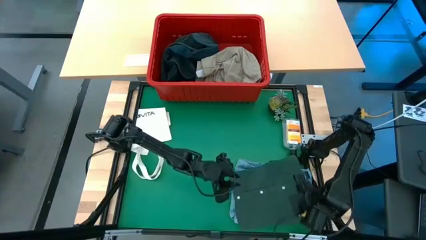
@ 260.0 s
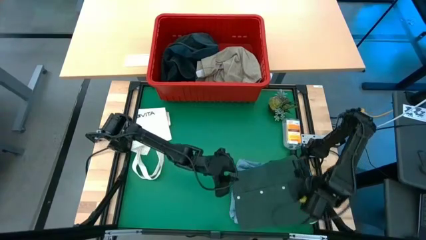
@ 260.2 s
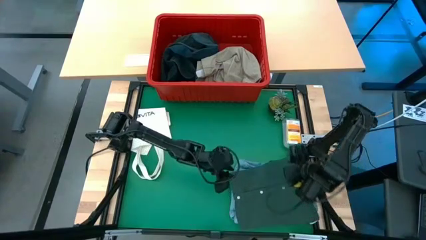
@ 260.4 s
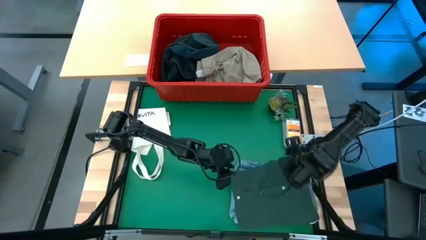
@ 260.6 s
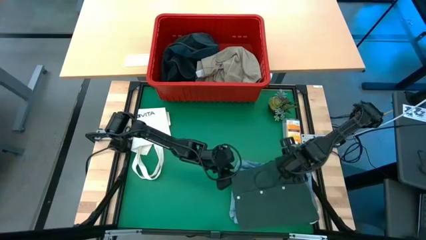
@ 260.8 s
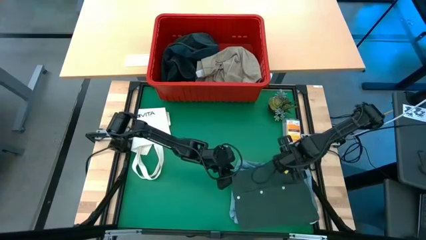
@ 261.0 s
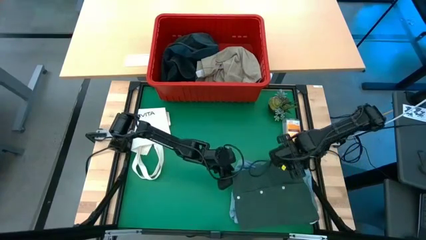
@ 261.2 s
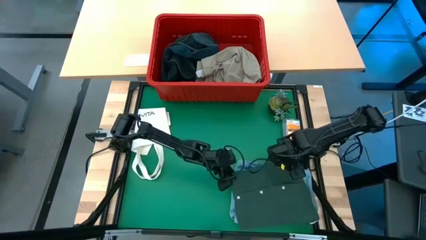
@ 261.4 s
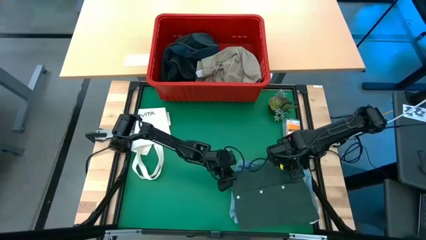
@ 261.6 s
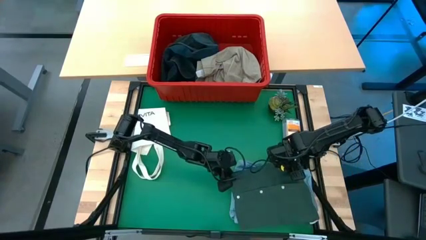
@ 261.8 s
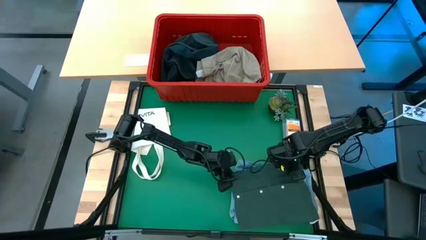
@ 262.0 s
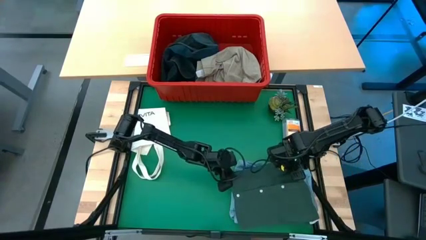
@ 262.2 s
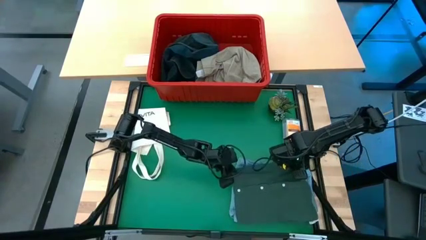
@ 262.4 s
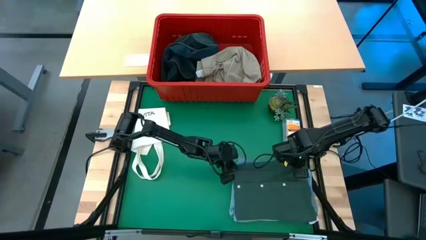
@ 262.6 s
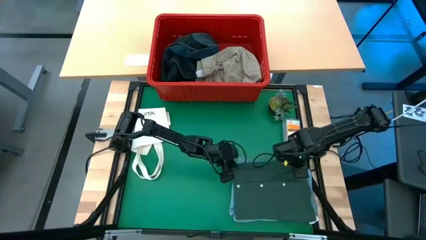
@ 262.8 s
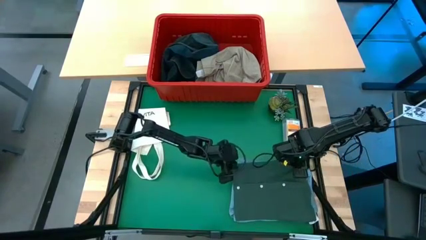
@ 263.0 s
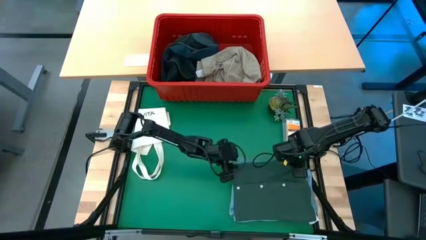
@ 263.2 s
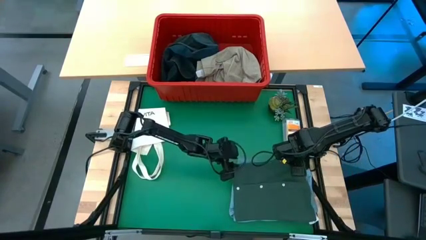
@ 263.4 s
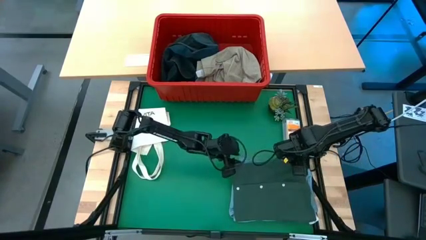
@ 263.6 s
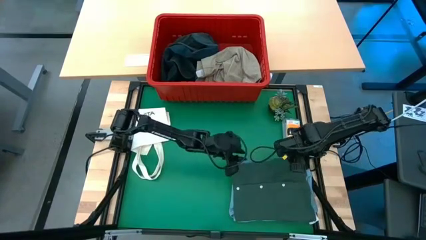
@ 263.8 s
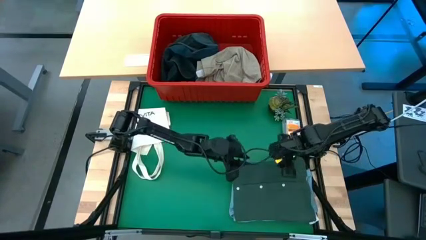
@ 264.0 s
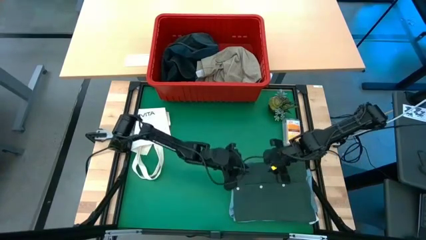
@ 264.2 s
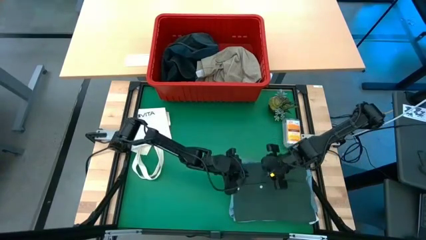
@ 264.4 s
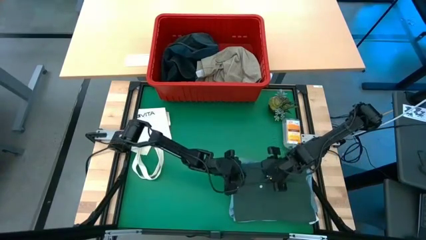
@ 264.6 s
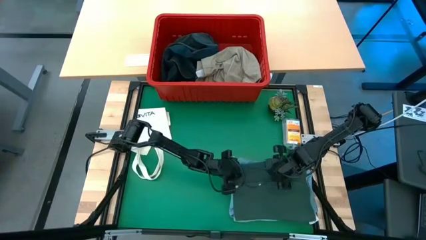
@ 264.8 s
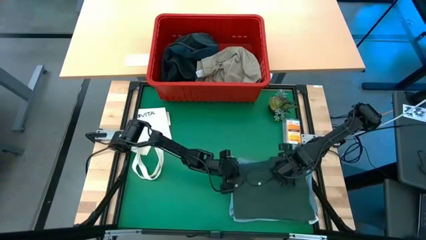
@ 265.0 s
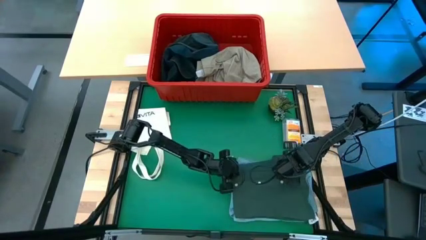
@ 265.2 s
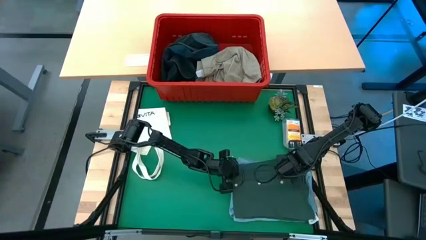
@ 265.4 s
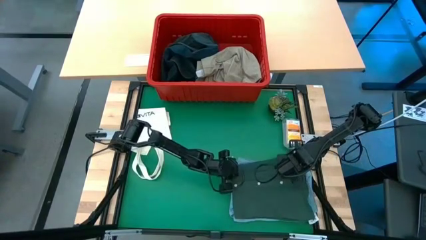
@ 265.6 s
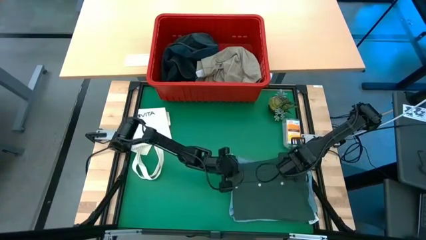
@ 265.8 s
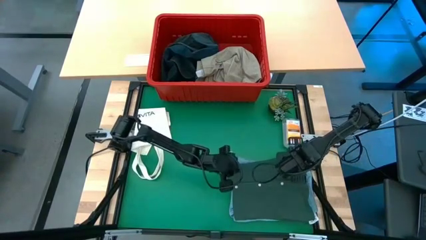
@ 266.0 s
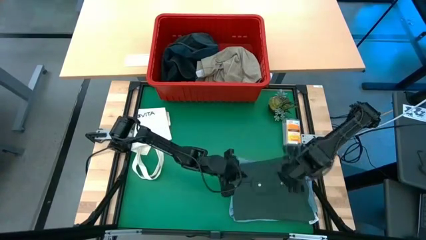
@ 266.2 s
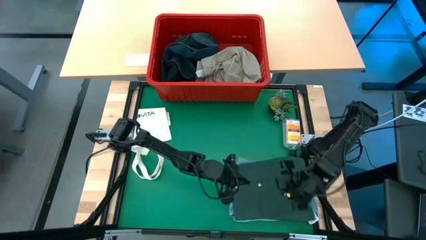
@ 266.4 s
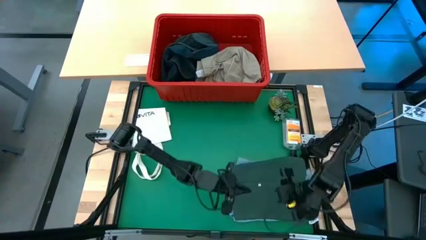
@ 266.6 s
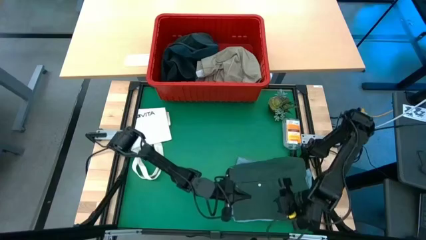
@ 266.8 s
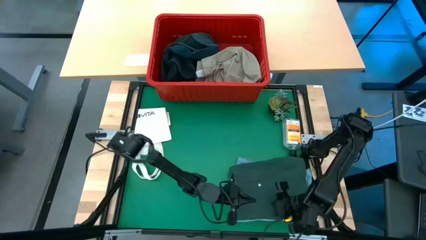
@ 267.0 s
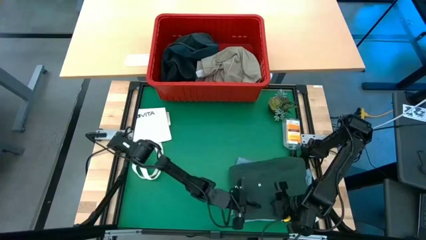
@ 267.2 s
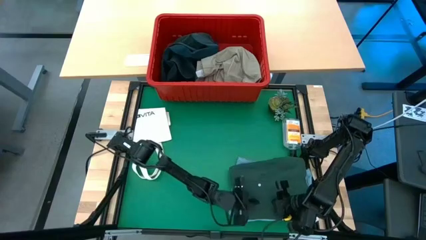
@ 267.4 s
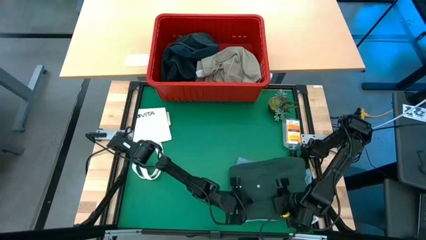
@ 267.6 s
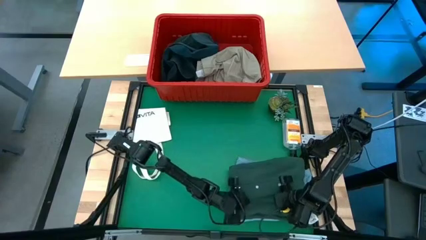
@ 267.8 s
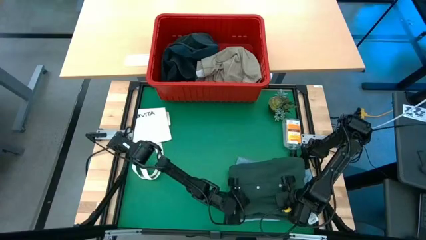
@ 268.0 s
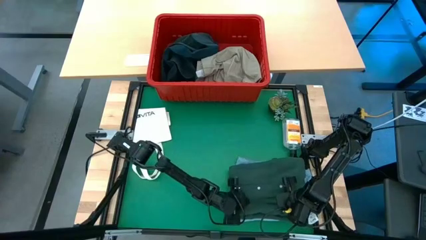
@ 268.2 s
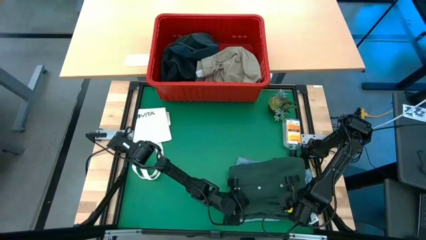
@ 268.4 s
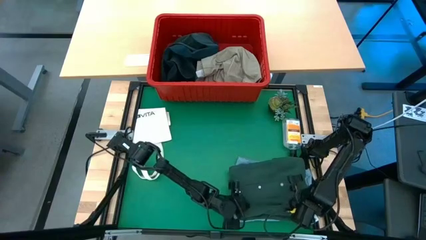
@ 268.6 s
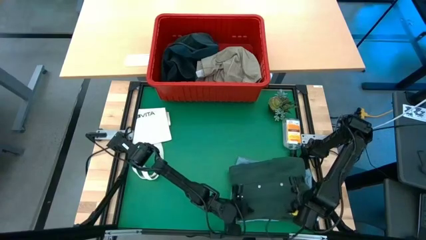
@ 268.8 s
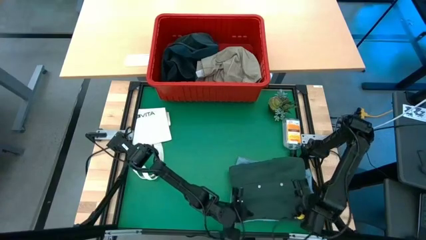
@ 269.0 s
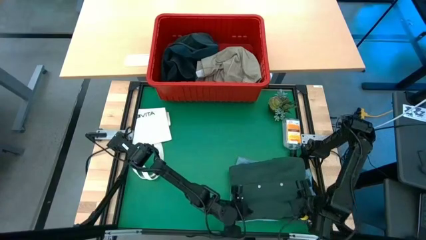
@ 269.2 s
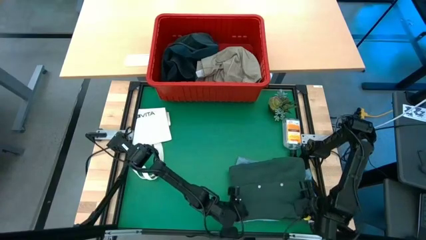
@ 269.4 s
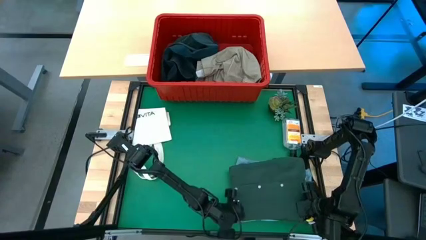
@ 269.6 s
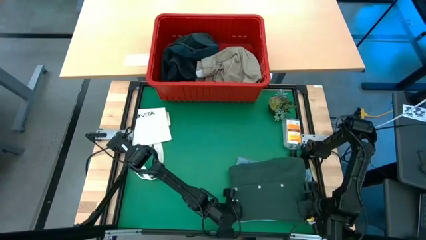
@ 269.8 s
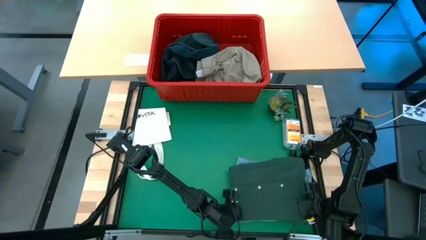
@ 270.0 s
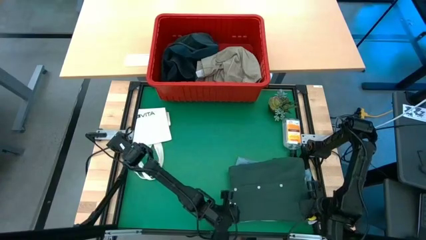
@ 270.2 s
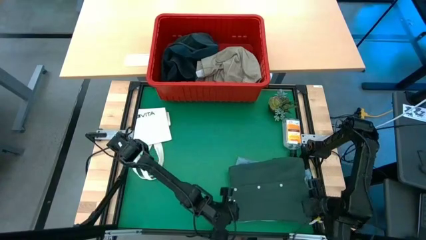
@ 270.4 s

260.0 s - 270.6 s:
Task: Fold Laundry from Bin
Stack the green shirt on top of the light blue jeans

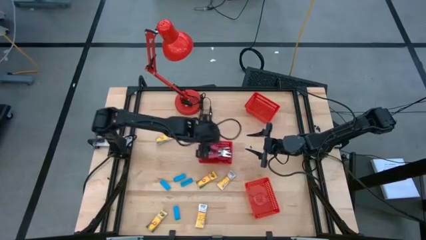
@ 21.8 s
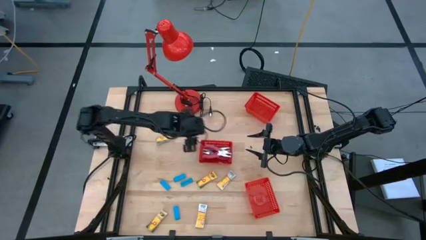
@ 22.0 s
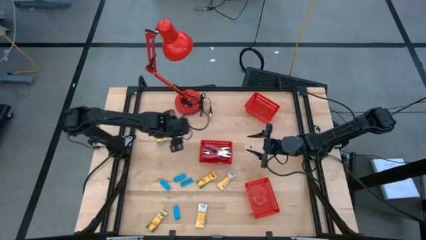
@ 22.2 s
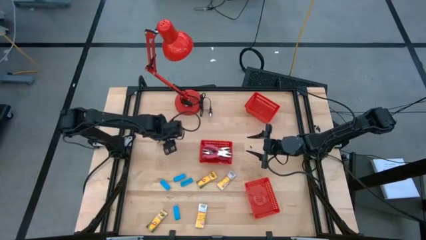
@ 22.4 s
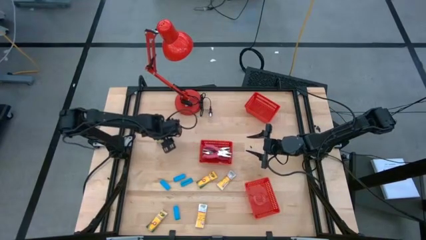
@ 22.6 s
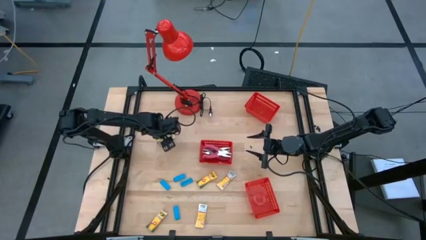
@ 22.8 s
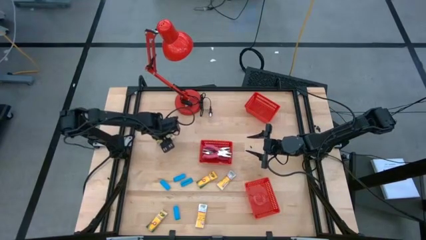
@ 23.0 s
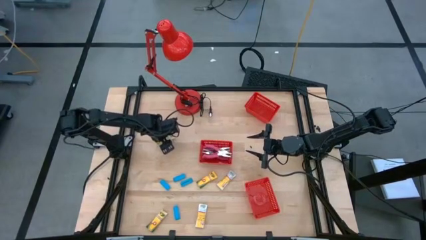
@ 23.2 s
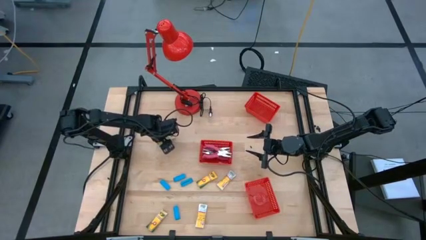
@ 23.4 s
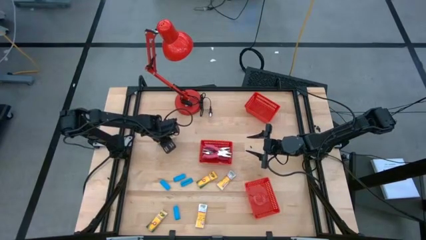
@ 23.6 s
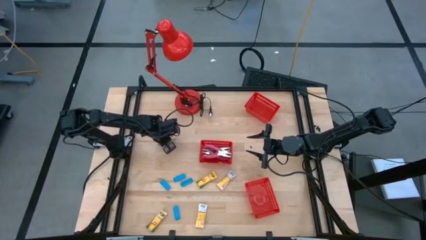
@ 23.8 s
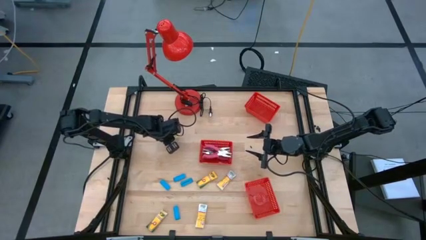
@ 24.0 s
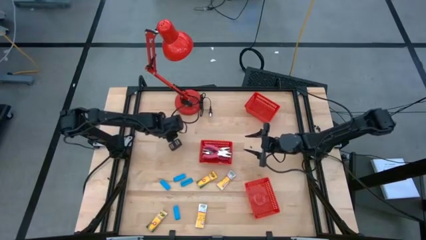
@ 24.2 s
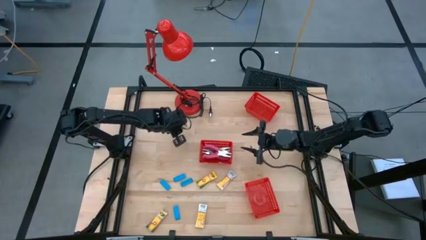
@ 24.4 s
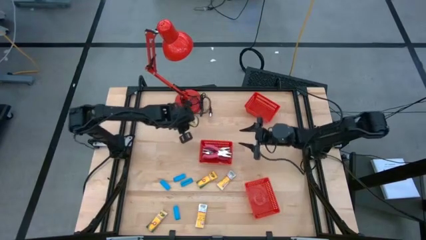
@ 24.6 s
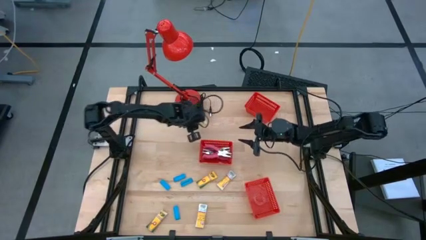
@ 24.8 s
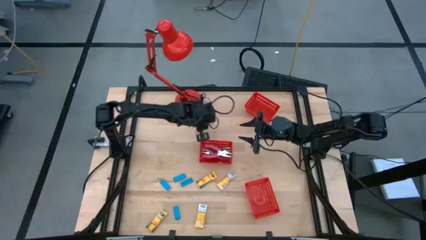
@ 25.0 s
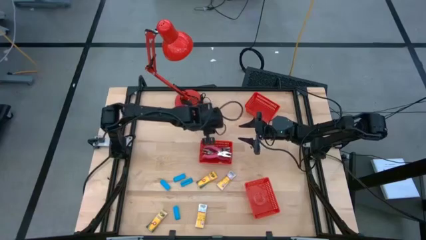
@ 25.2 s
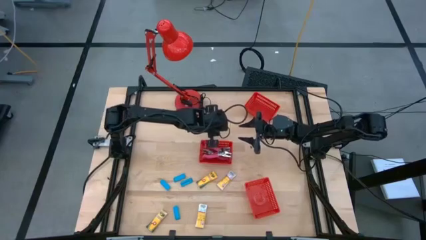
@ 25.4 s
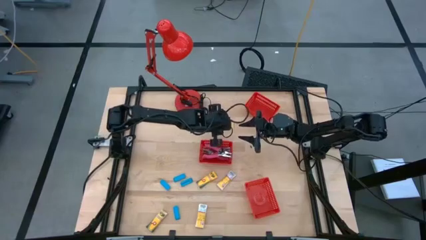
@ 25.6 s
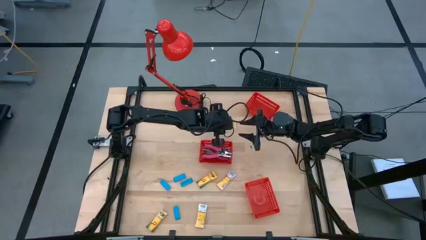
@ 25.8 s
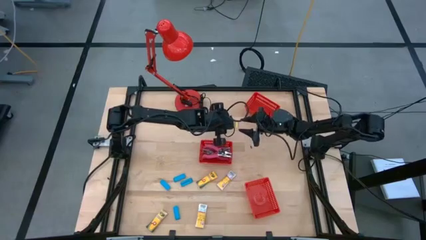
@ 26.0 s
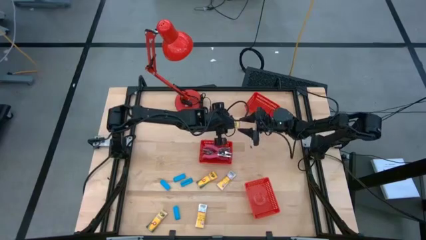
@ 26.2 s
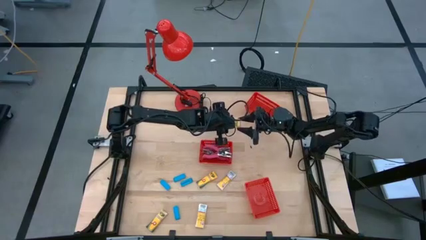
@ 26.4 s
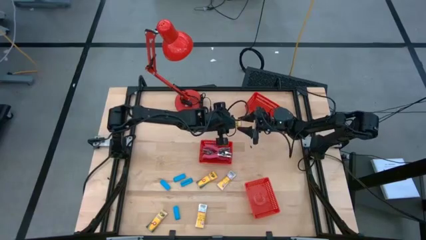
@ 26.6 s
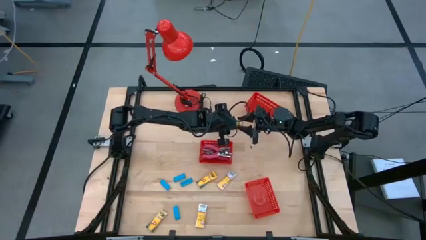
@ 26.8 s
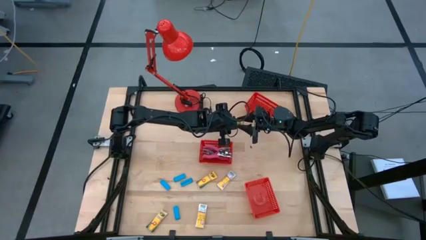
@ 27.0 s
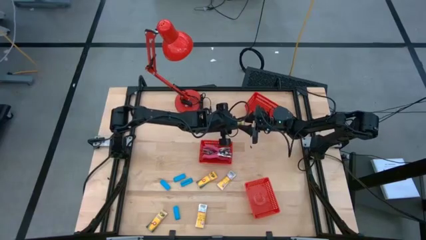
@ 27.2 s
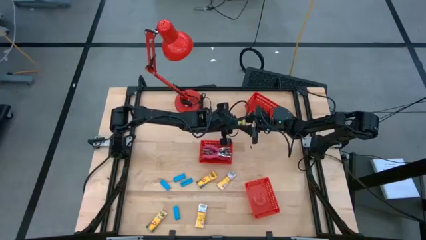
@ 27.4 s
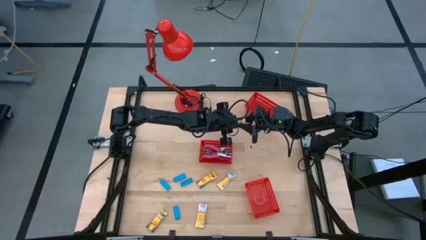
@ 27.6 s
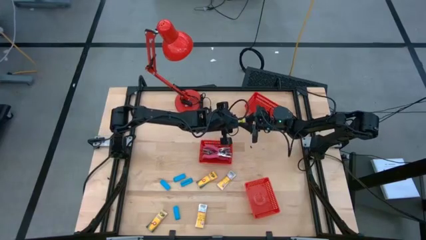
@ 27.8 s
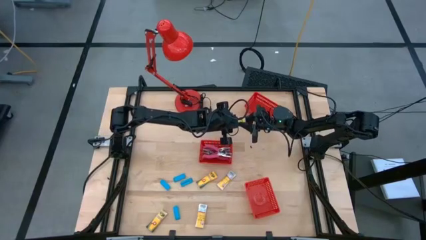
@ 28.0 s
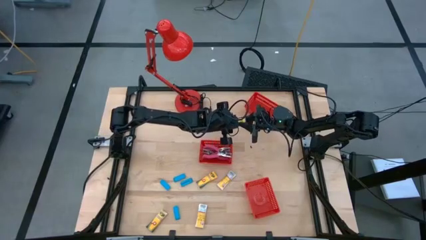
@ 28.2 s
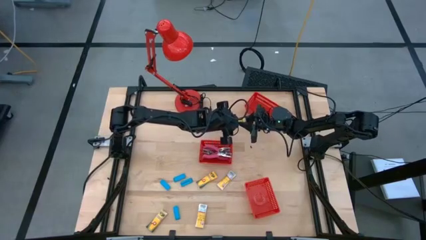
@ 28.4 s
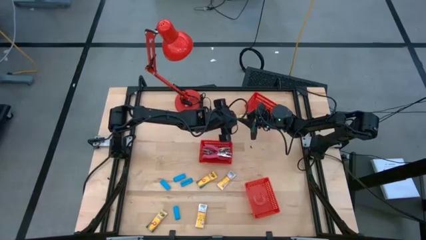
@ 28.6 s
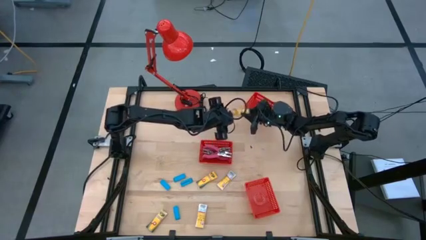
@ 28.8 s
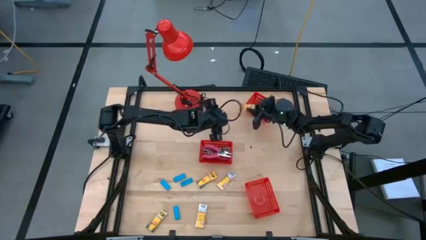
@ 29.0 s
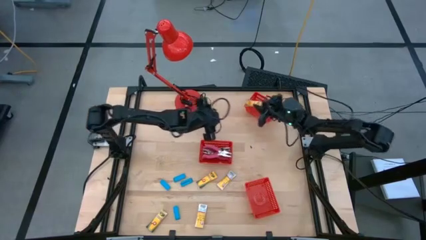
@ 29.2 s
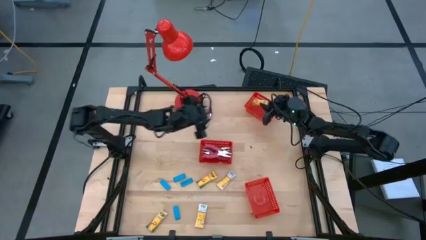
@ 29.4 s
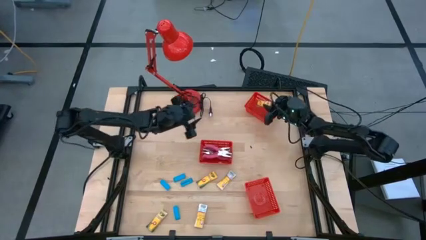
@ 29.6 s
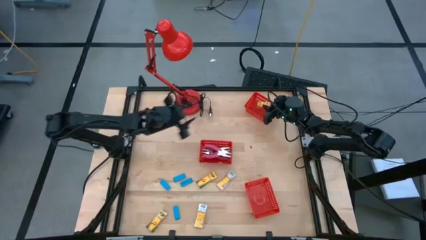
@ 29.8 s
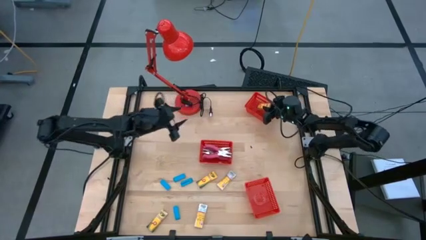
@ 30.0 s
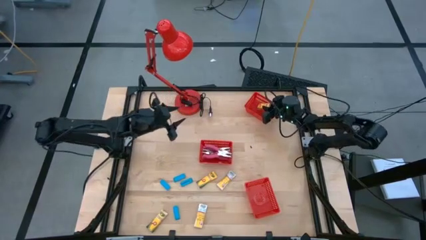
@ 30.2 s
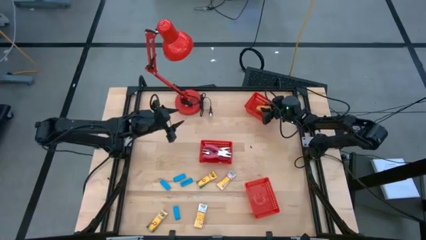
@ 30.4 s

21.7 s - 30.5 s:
Task: Pick & Place School Supplies
Put the yellow crayon box into the top red bin
